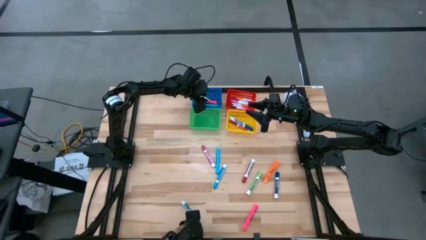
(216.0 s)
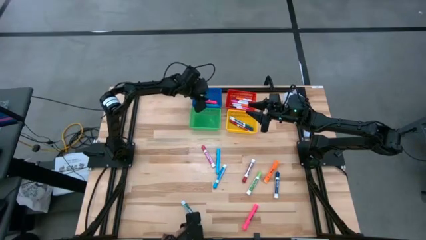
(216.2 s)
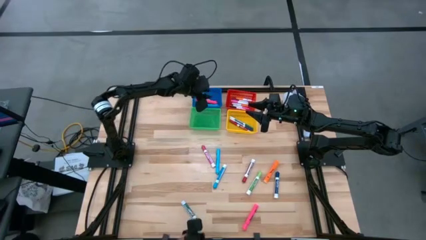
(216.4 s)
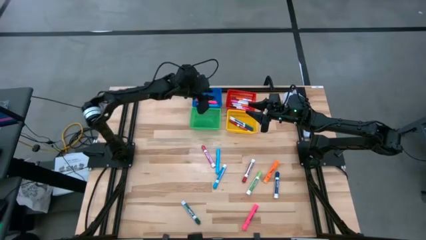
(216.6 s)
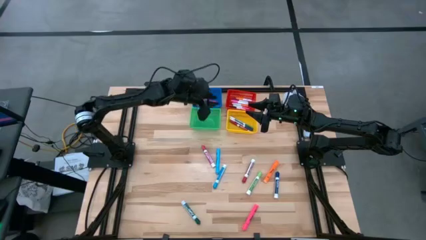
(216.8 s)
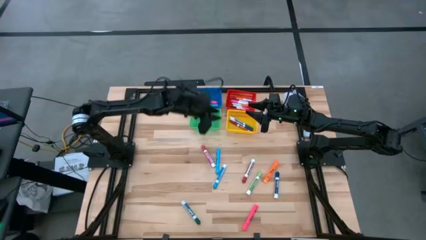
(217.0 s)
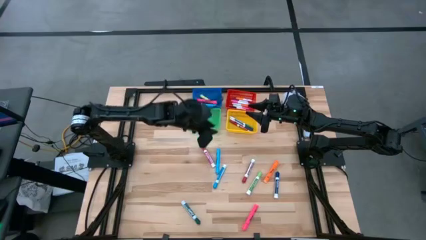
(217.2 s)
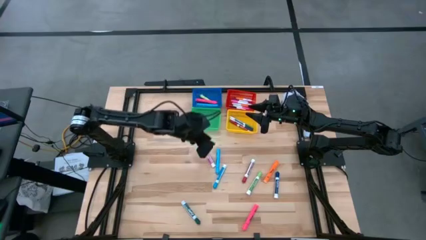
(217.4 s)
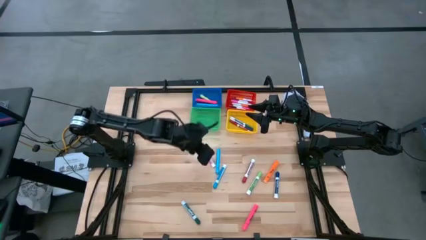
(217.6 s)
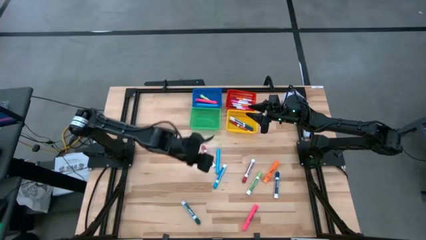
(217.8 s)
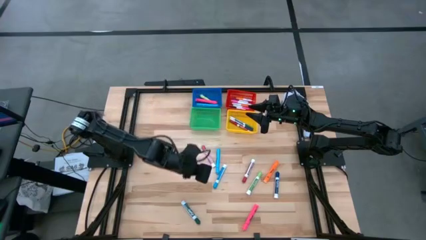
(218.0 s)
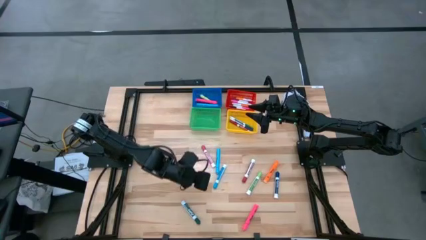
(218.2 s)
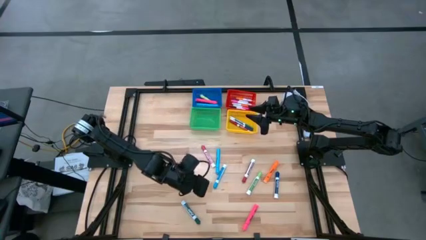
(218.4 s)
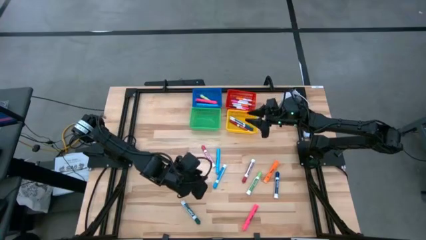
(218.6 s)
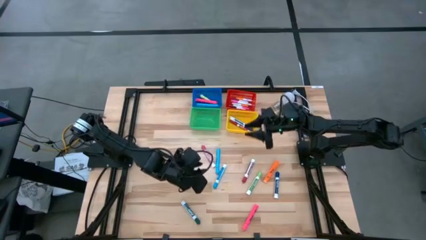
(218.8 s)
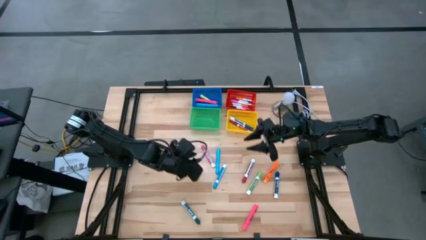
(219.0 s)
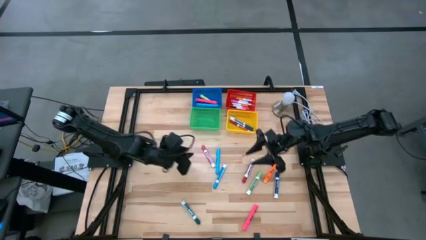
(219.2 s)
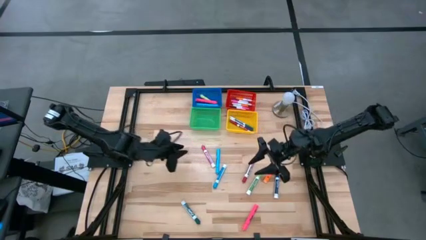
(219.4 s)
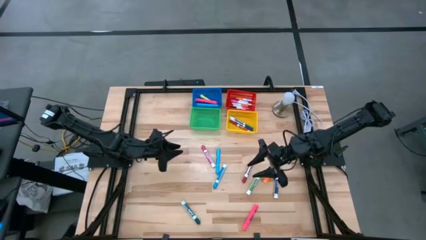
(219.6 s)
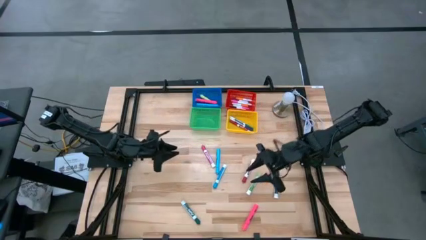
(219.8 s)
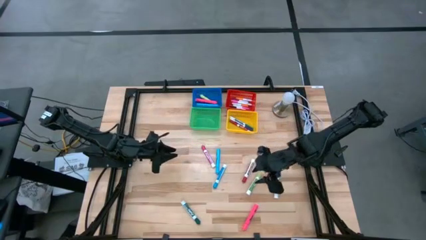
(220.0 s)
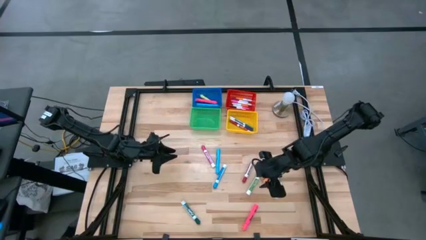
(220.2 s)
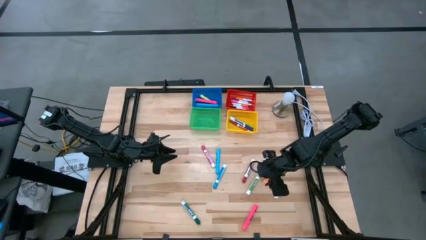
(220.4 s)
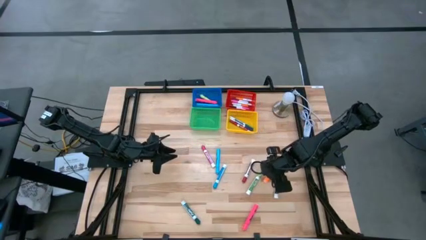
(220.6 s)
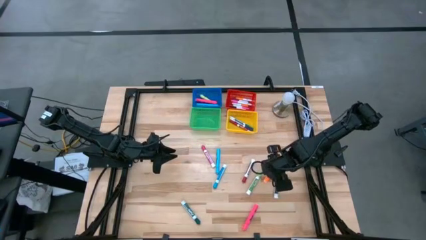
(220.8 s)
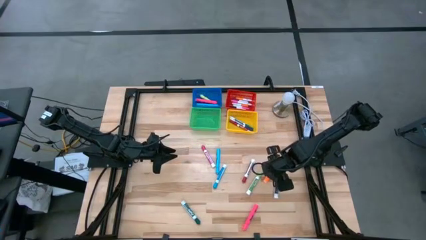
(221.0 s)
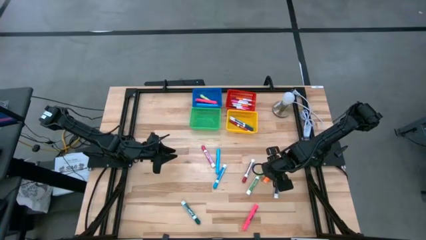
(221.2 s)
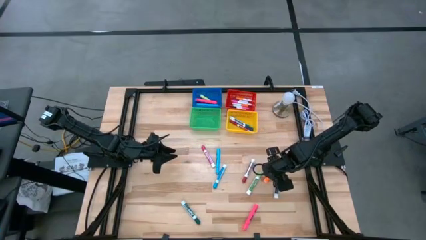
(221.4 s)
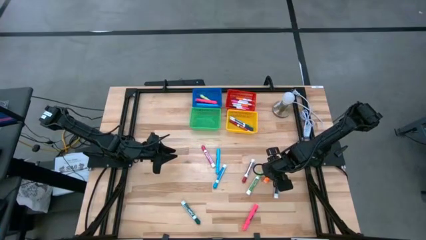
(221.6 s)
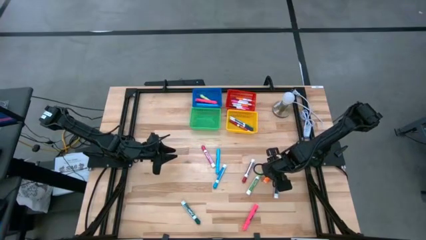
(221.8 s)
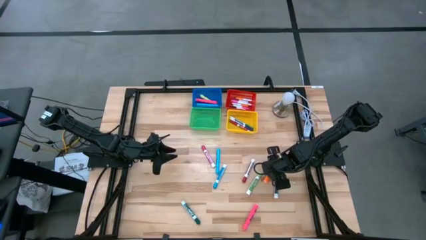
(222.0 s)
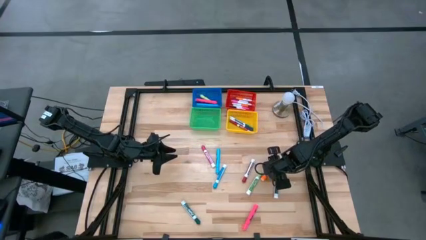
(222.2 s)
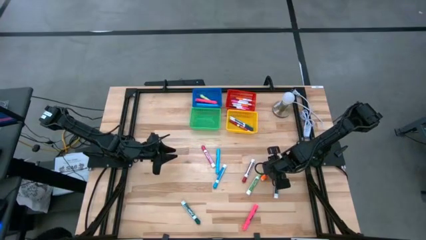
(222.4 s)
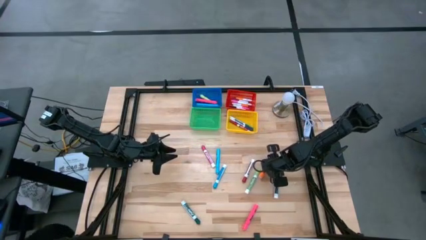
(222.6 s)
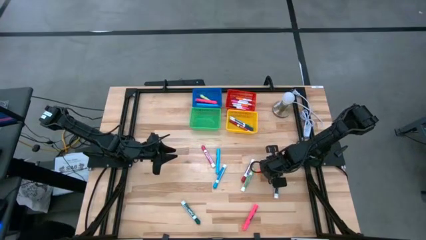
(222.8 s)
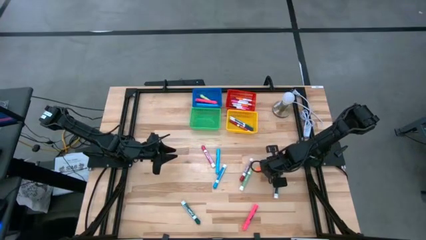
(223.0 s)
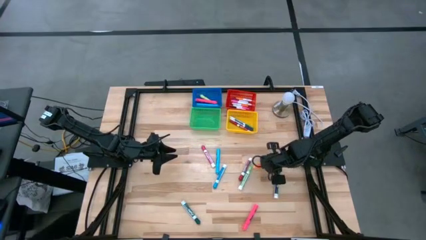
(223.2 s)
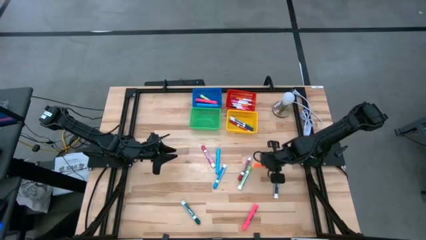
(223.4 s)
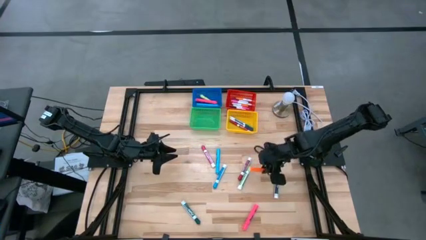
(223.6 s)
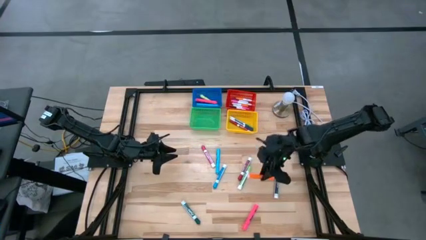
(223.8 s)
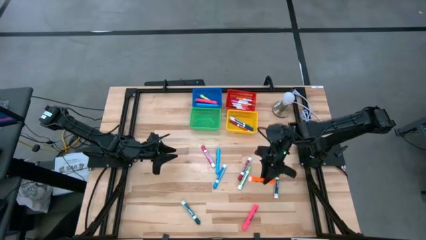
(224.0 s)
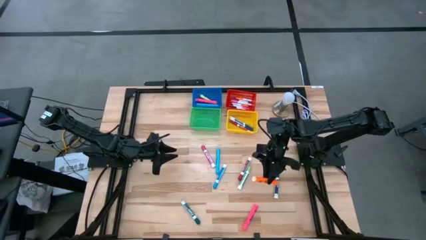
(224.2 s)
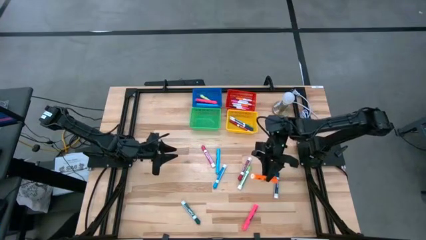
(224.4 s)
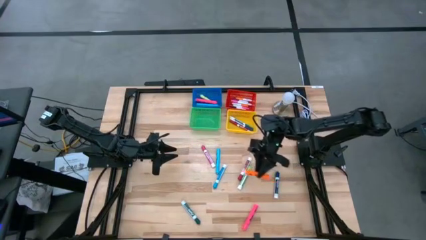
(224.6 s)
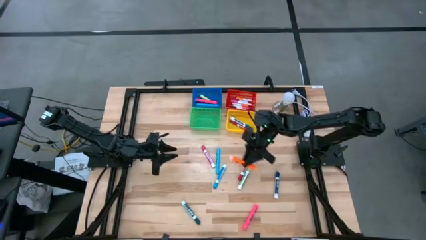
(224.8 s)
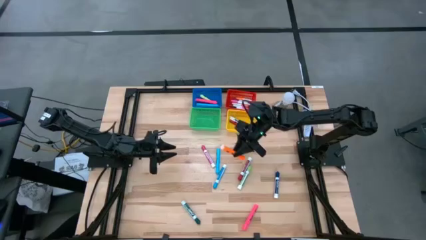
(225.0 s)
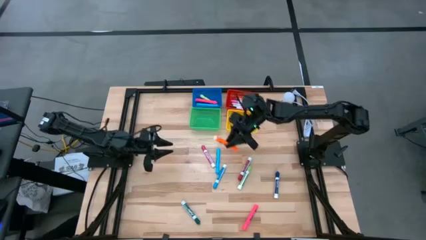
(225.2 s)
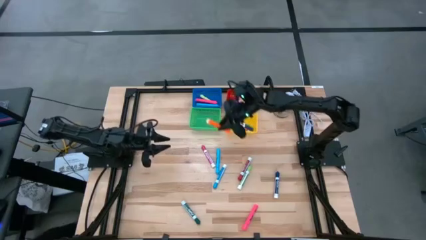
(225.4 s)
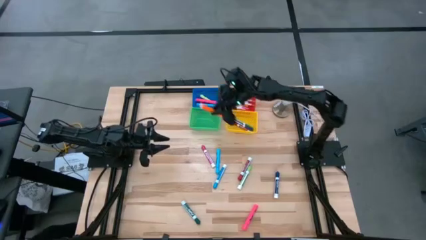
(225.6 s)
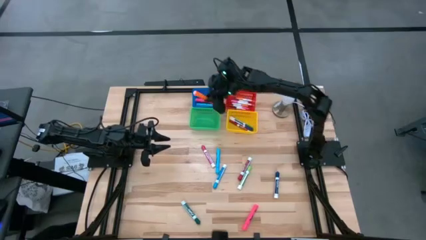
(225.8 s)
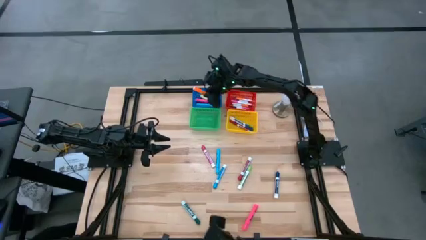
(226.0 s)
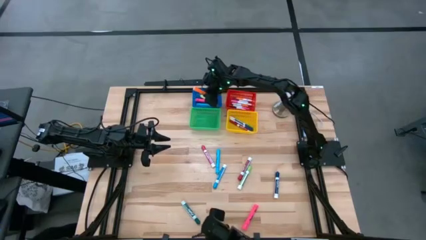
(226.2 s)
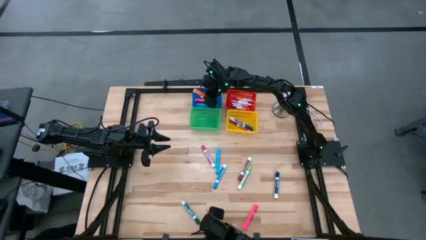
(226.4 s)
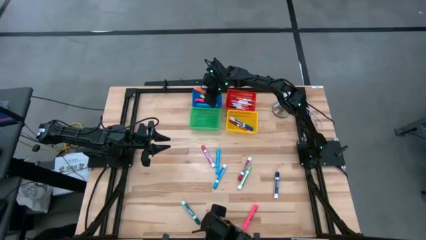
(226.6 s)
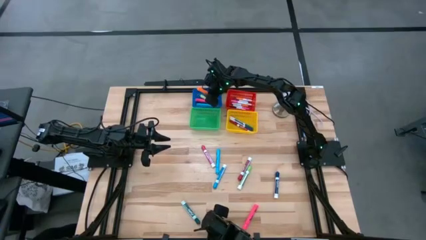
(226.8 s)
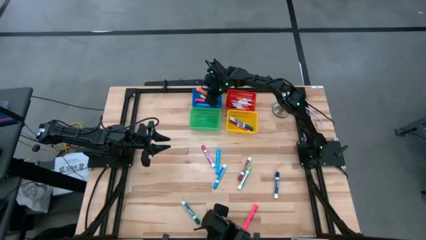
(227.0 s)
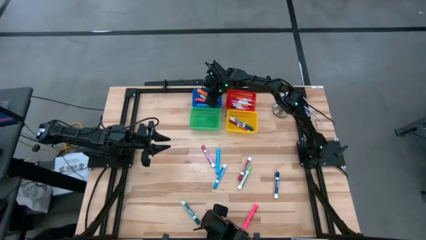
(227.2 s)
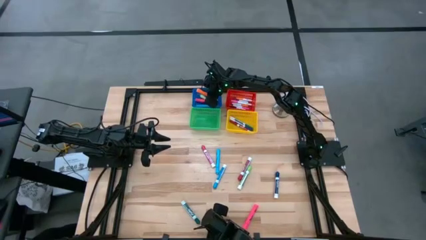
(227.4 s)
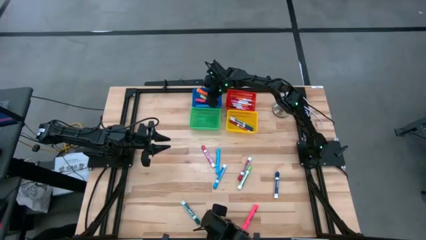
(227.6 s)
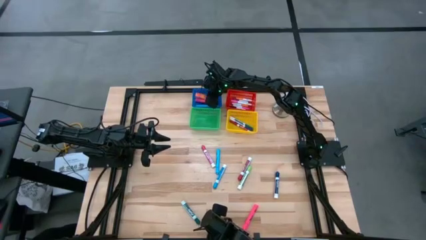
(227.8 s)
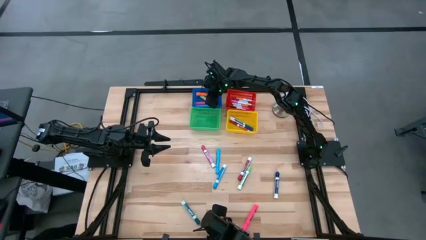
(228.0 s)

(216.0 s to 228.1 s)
Task: Pick & Place Markers
Put the orange highlighter into the blue basket
